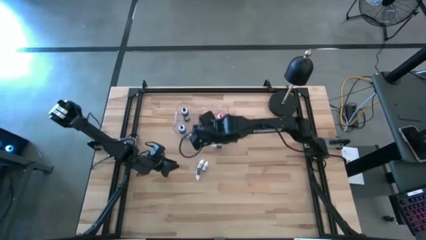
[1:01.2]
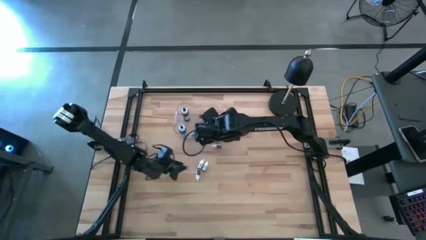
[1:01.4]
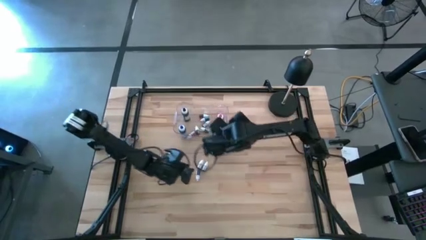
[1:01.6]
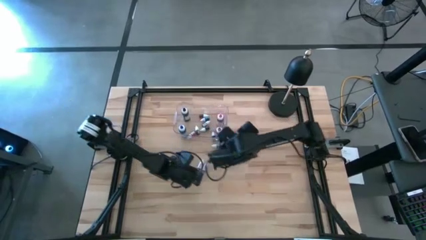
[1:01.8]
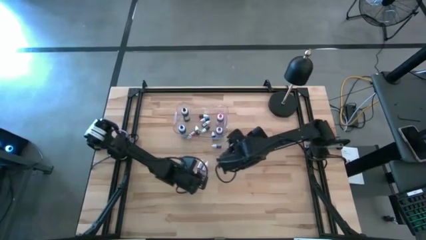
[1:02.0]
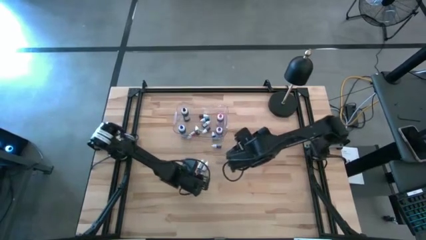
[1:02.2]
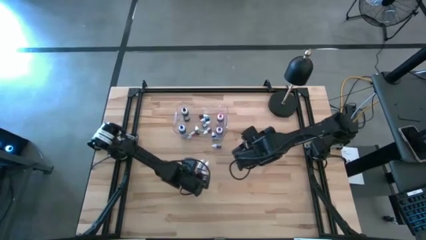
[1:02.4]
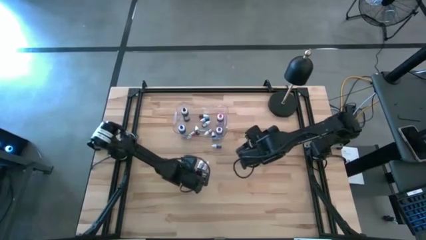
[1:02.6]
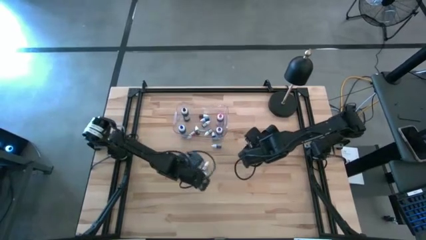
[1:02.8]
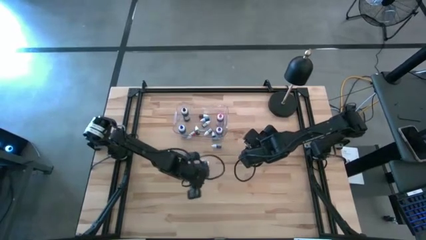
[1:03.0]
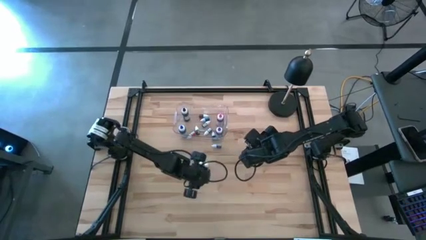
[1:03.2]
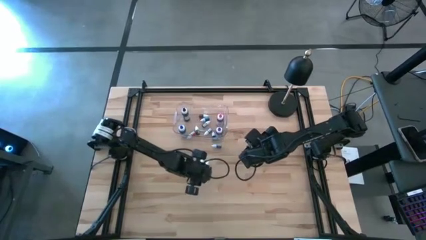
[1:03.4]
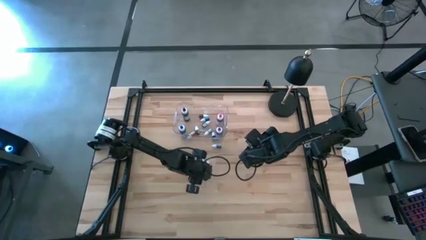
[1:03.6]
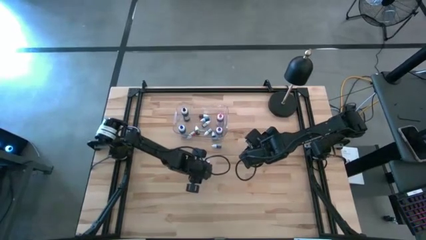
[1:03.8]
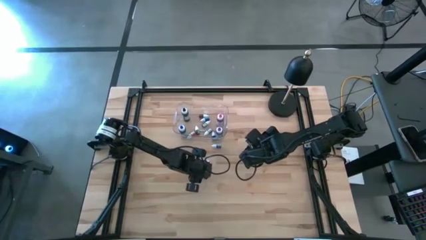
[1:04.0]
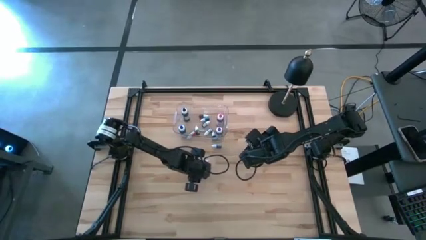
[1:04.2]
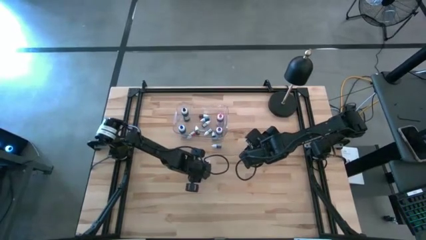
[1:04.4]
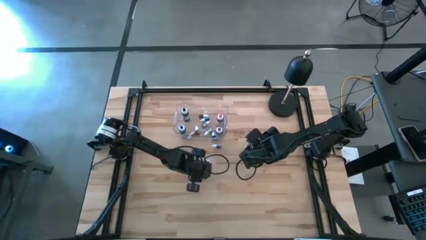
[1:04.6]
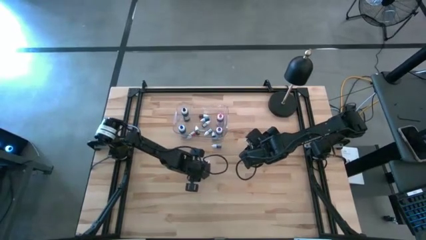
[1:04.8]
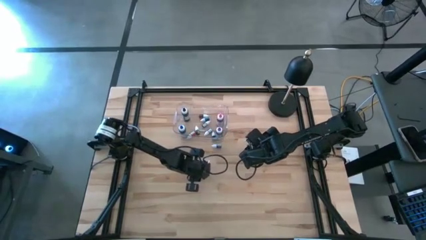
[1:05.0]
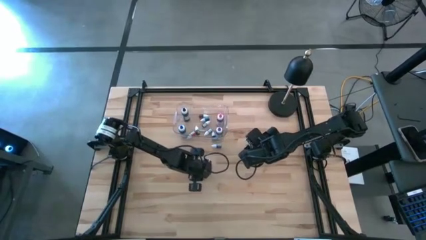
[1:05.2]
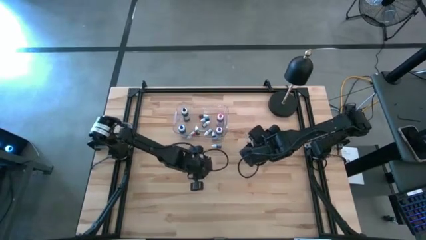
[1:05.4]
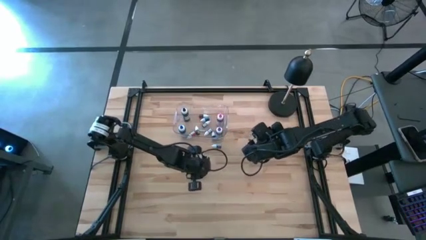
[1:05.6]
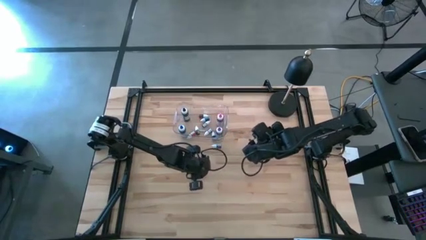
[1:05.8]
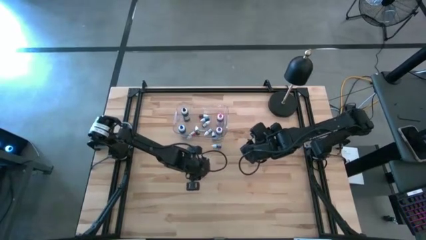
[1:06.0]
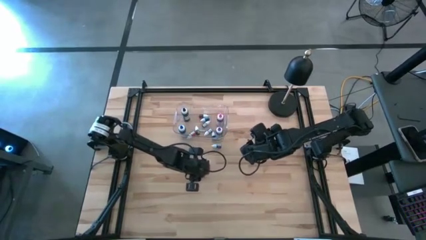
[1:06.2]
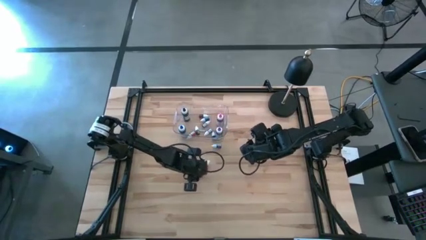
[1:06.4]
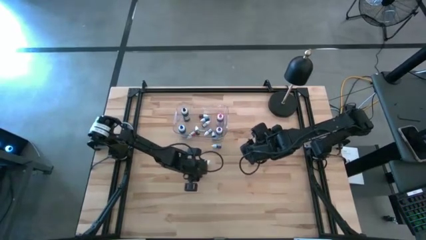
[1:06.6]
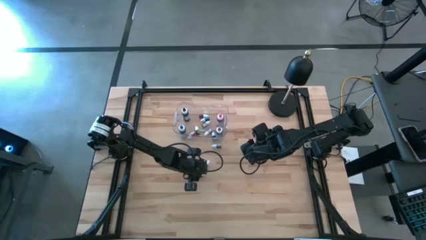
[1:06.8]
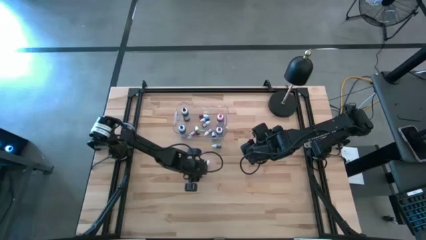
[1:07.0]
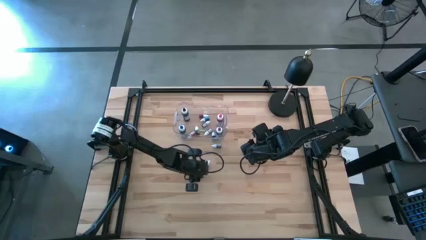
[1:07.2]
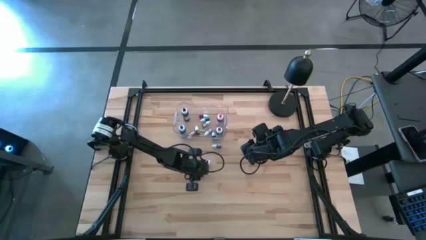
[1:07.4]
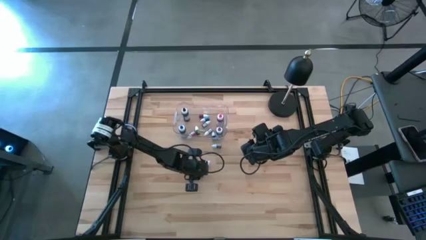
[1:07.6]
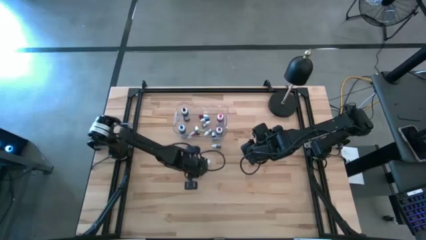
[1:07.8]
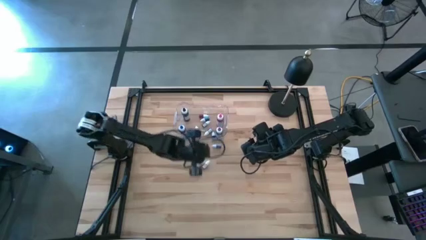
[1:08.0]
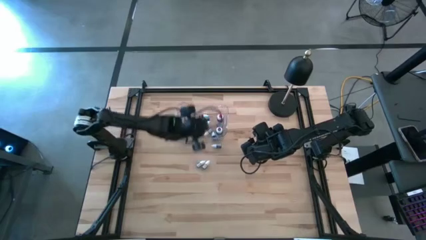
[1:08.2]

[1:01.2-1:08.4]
Task: Pick & Place food coloring
Put the small violet food coloring bottle into the transparent bin

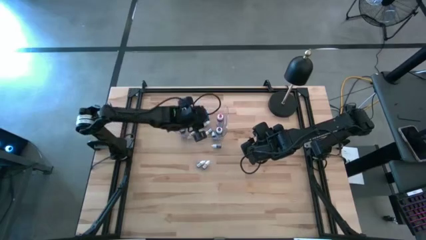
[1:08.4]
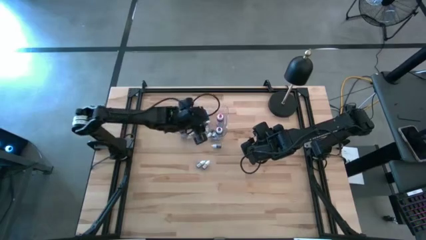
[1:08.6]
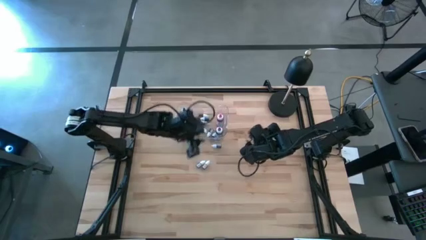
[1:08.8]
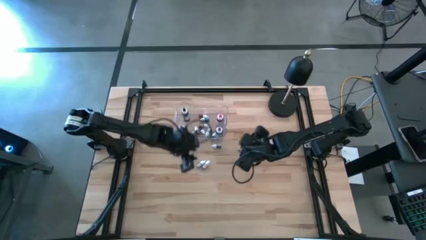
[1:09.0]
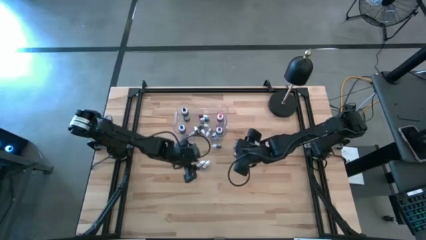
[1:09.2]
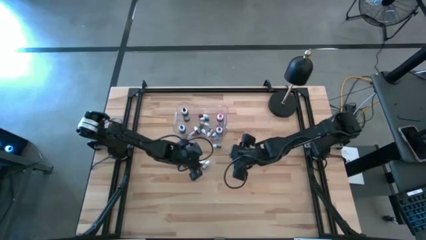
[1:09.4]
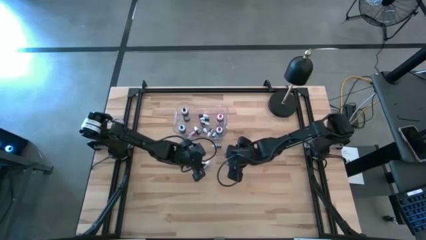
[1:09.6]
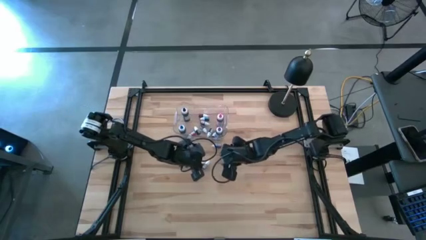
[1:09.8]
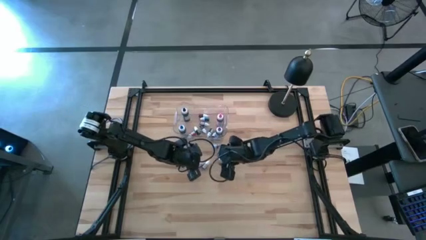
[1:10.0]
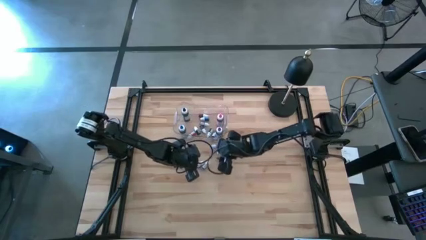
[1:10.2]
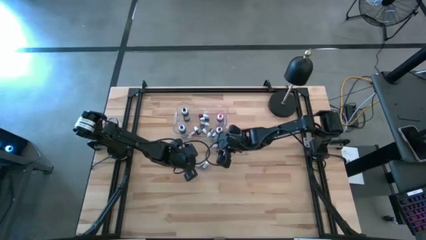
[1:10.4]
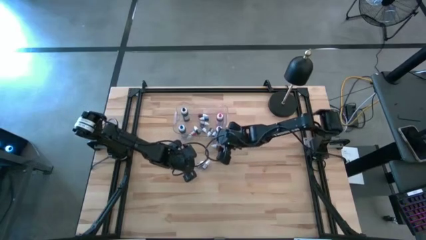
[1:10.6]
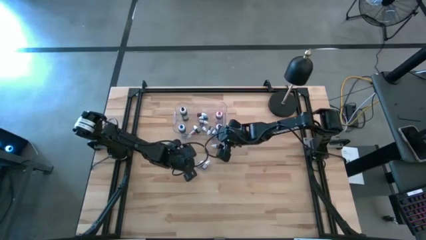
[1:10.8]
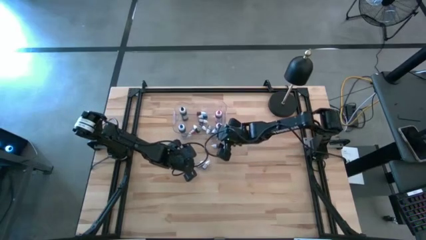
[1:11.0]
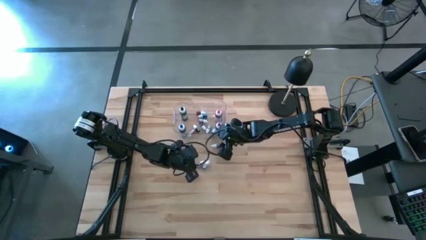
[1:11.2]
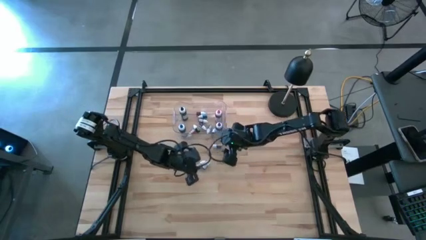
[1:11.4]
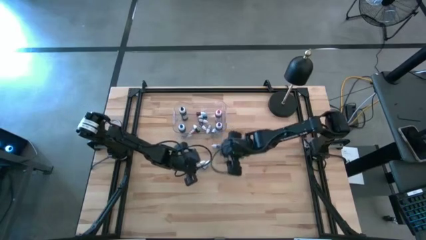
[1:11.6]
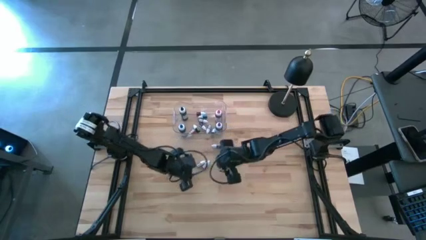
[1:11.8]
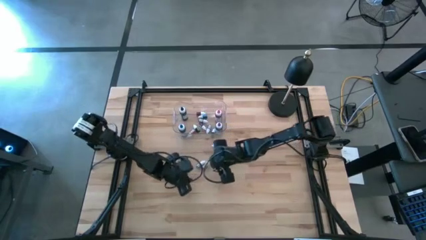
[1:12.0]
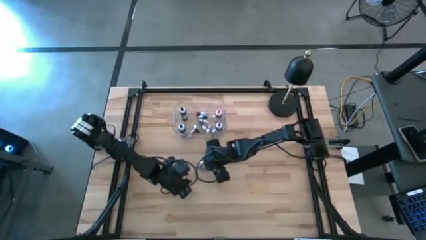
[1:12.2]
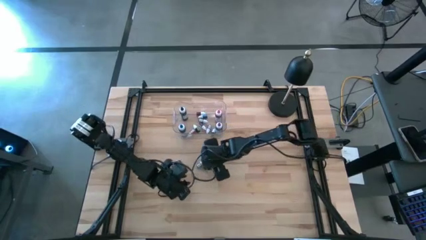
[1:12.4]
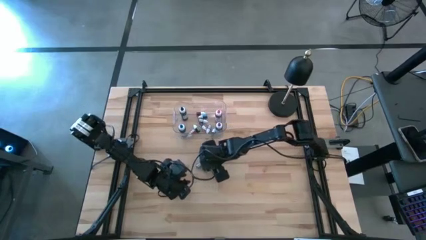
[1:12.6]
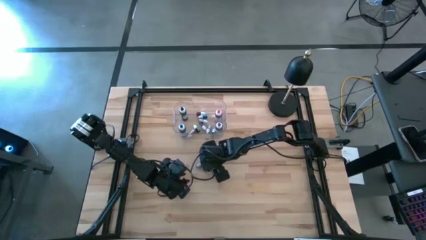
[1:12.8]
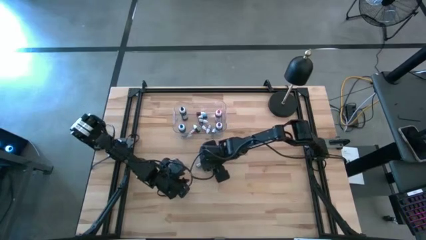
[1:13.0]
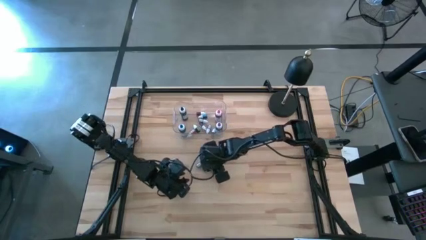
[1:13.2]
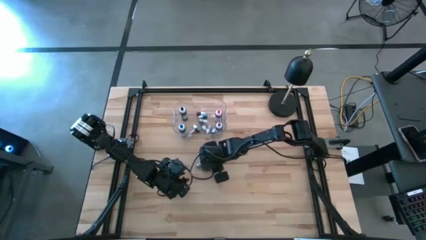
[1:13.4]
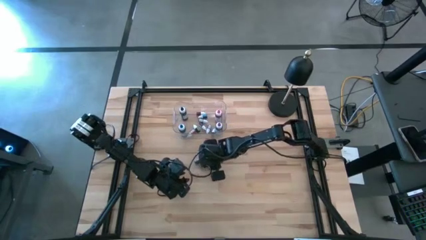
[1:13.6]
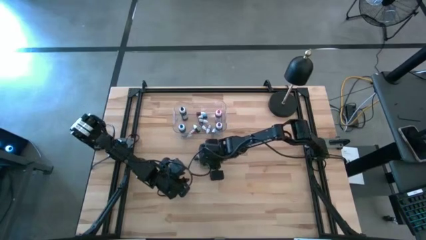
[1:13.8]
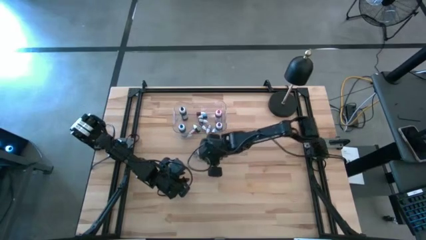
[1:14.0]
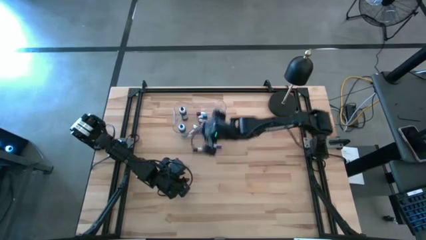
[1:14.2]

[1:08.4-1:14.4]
Put the small red food coloring bottle into the transparent bin

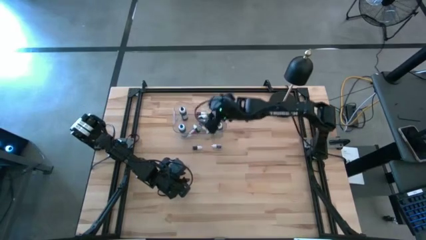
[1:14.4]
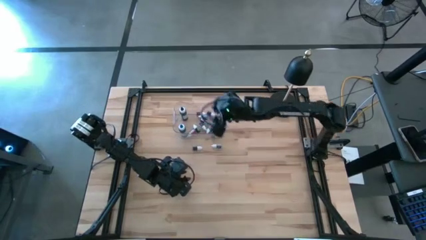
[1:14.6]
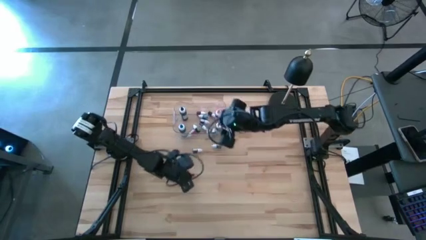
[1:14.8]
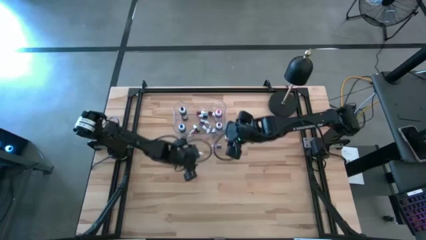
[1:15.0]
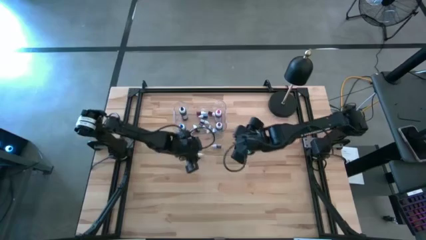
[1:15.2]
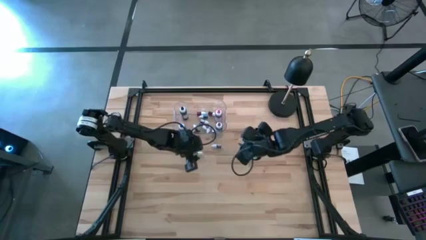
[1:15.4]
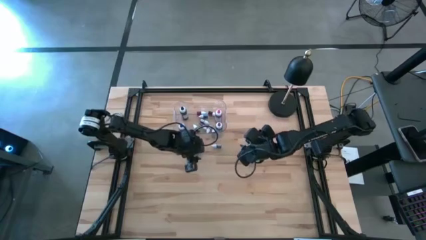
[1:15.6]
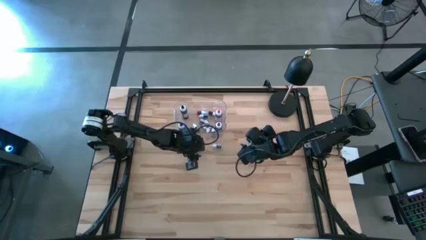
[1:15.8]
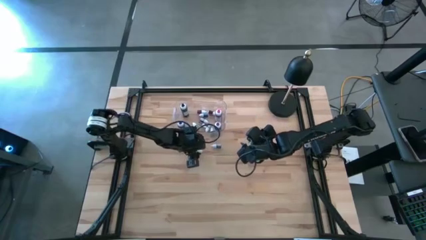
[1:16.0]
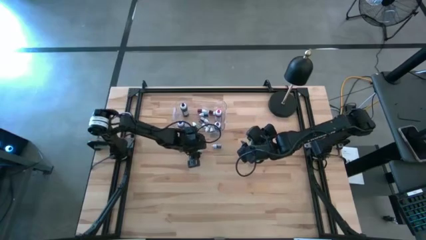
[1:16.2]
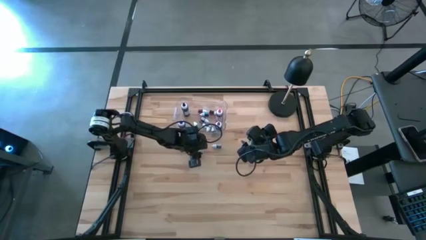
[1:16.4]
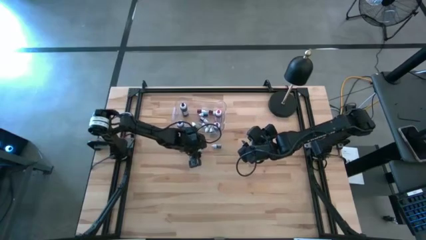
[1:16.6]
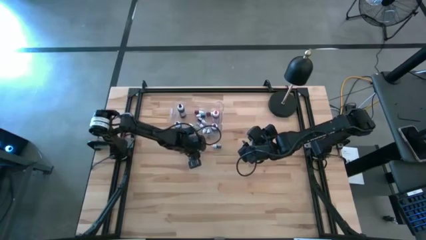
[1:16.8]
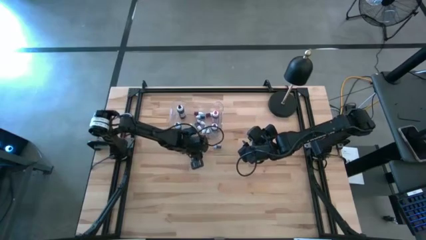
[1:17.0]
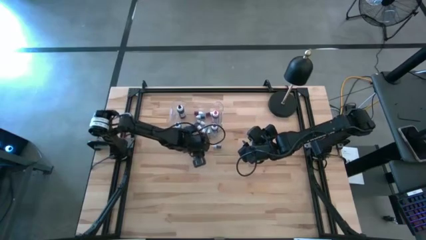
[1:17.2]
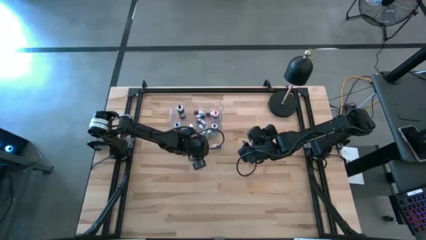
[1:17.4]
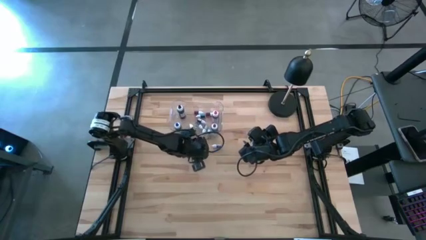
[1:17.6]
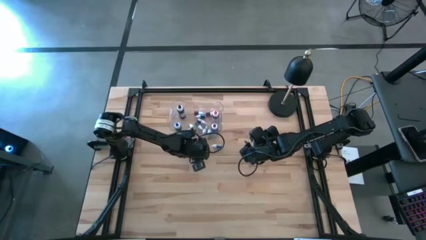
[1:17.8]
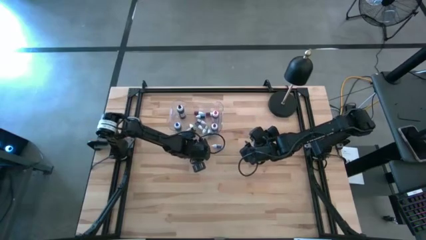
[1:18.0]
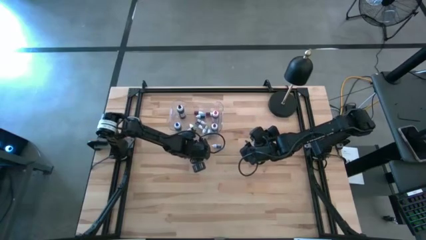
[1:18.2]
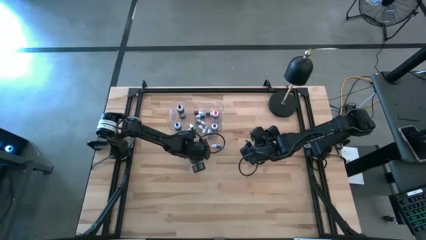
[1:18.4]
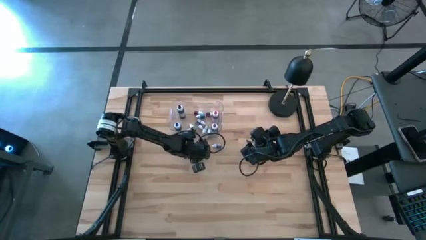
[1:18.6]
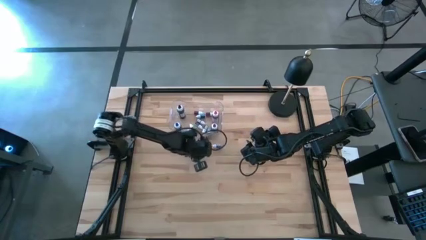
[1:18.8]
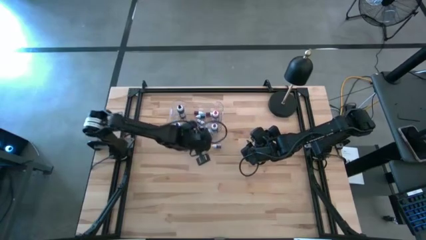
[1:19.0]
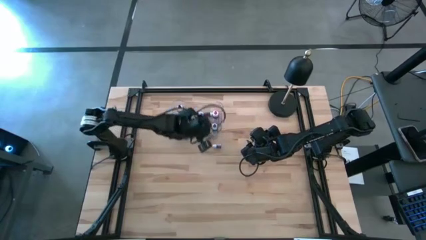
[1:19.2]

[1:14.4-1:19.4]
Put the small green food coloring bottle into the transparent bin
